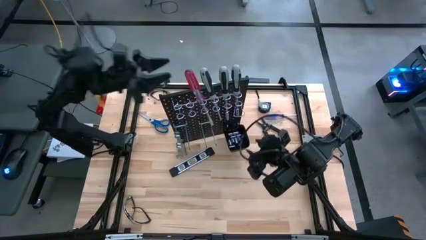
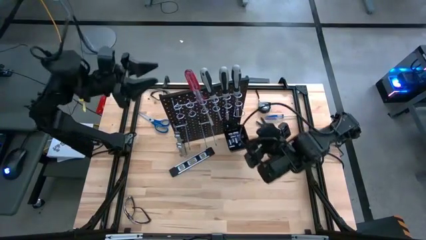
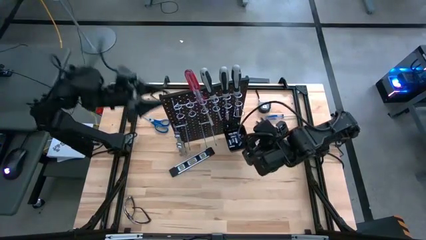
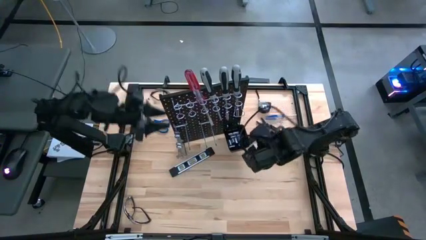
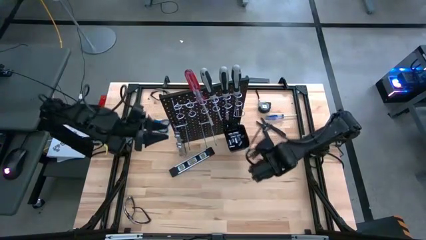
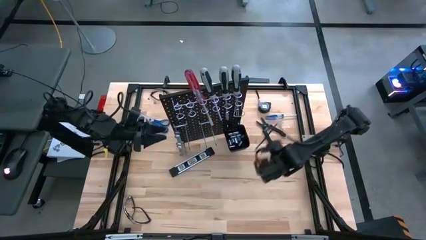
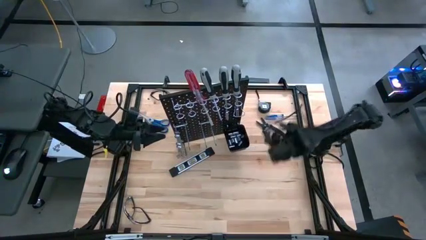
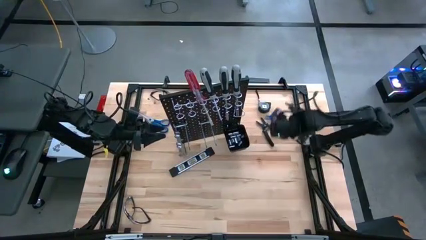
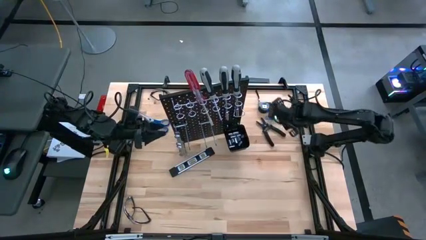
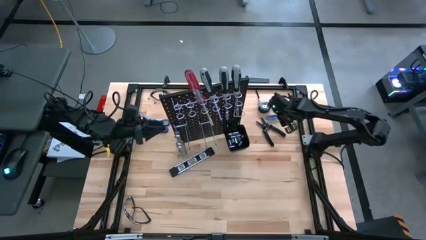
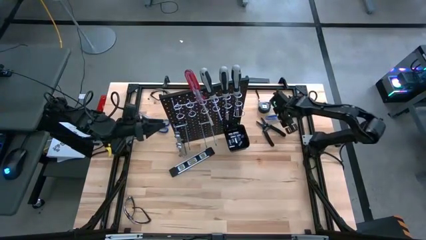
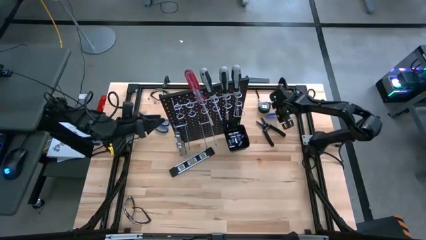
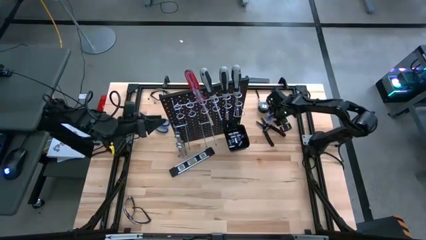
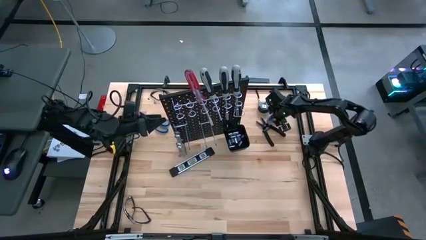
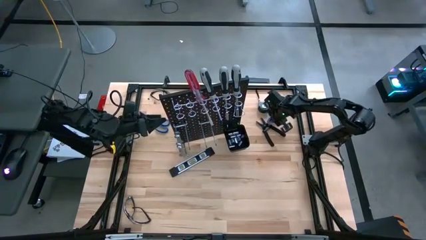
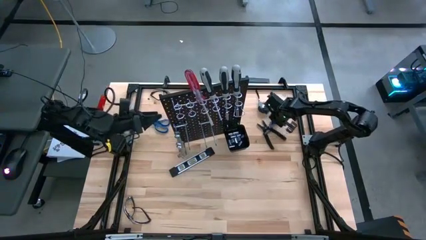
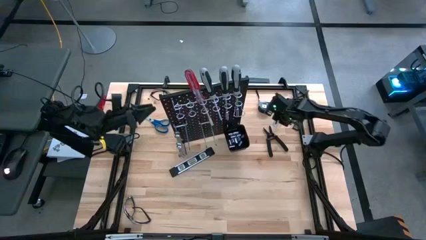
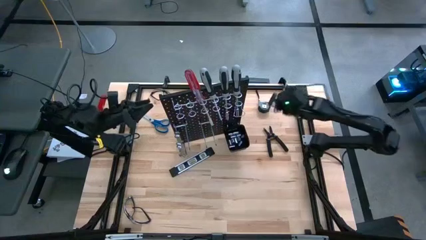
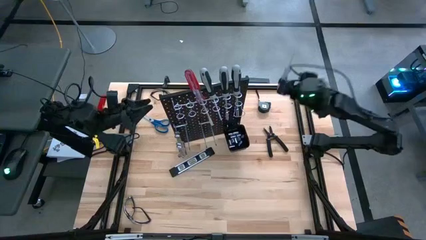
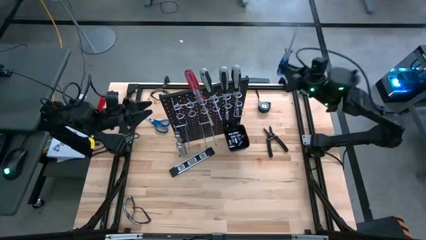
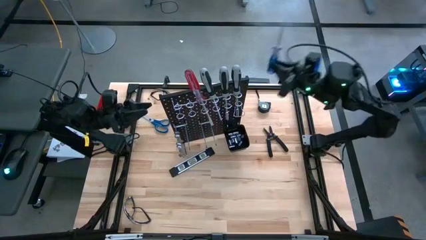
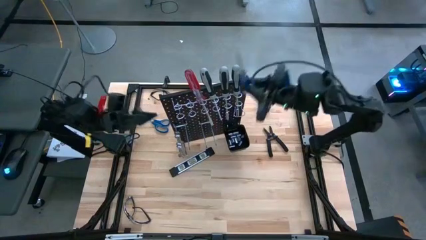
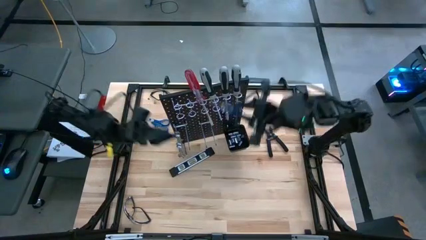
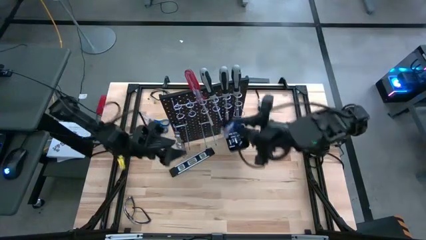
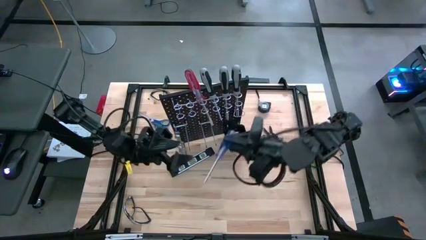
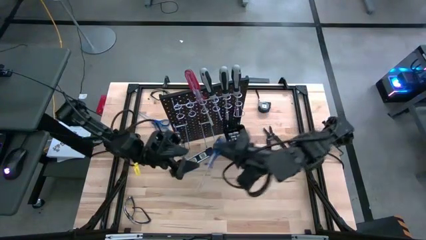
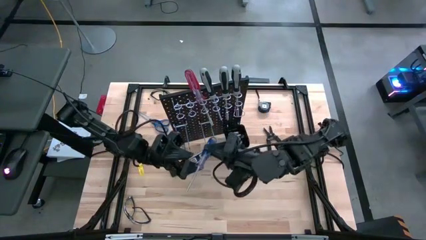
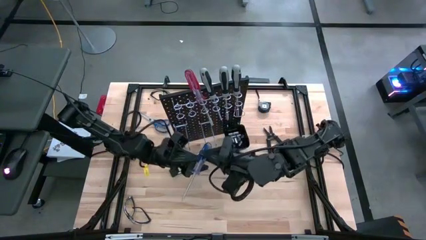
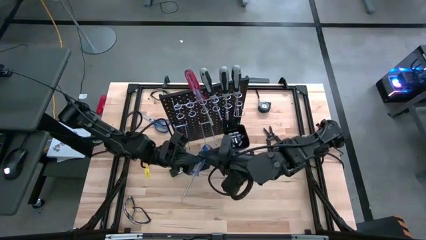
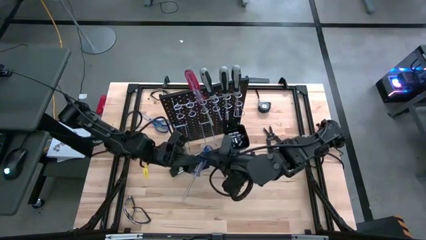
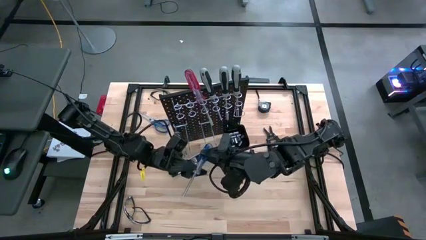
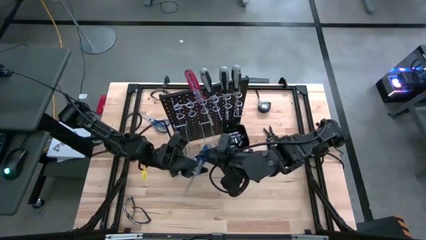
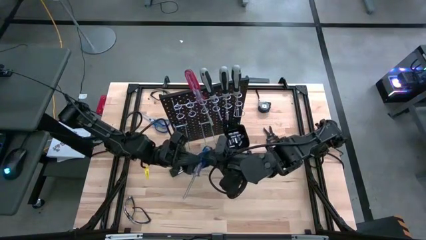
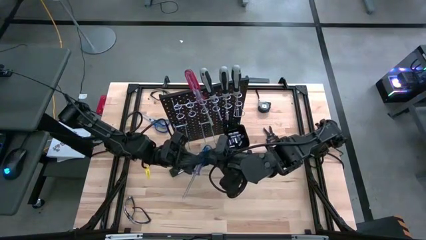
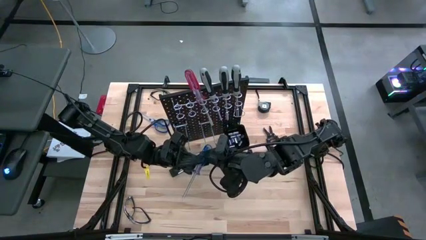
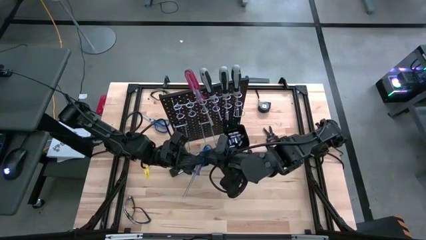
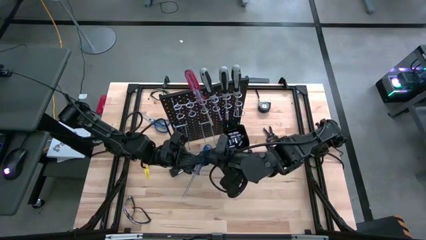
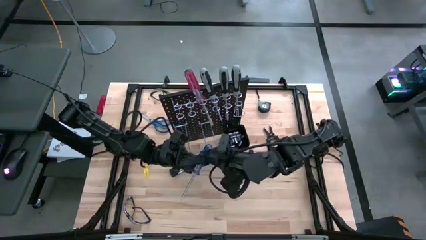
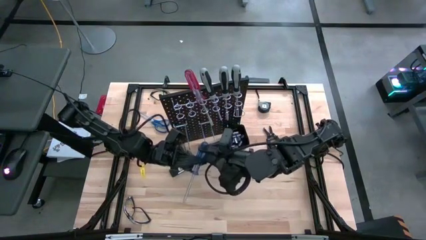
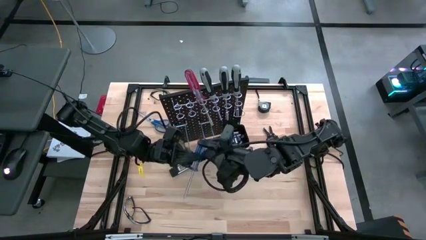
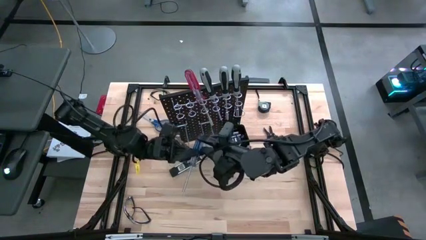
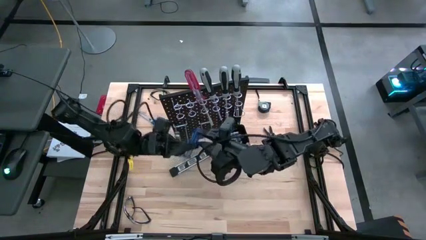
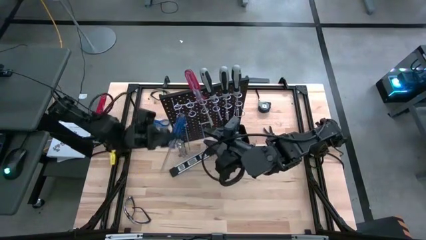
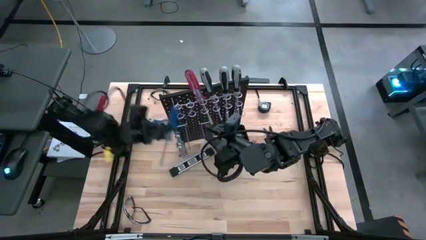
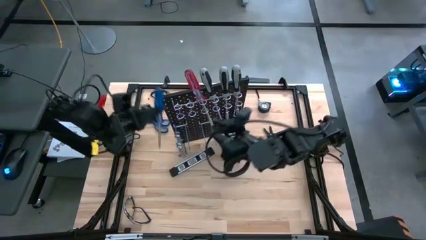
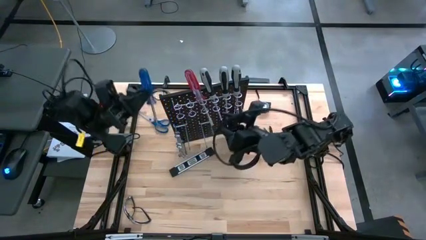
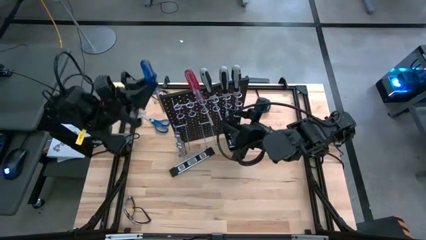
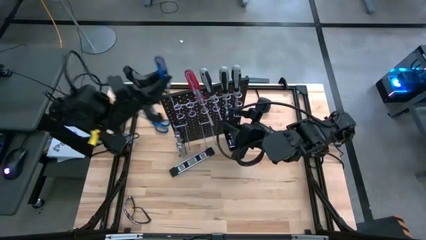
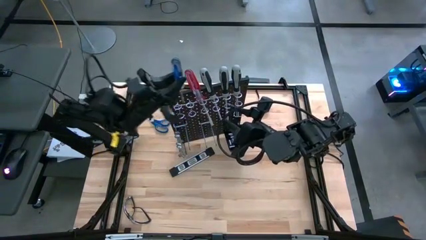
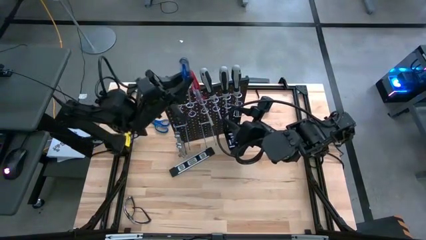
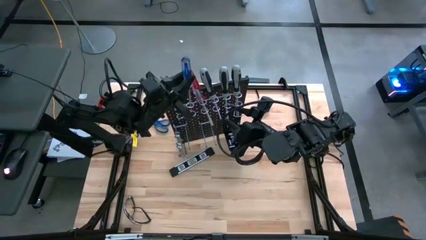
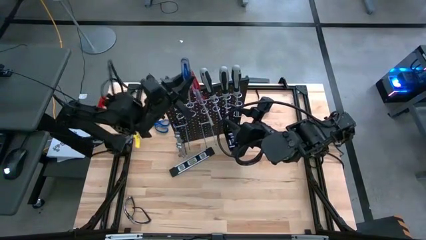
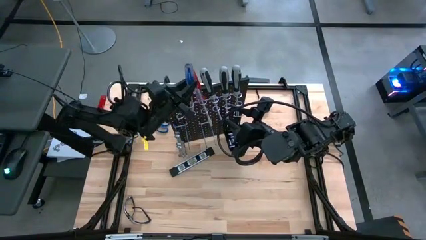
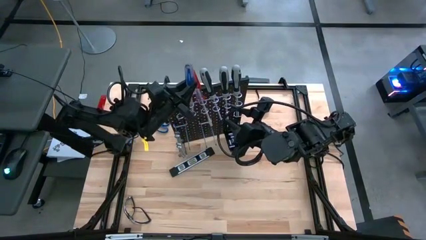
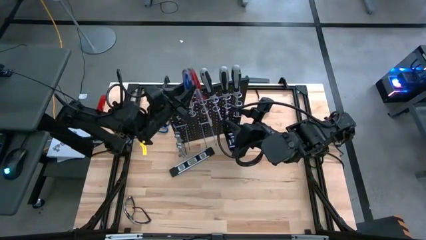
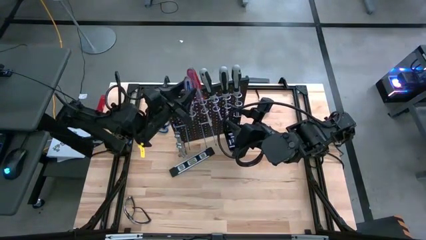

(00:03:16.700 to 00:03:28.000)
Task: Hang tools onto peg board
Hang the blue transparent screwdriver on the pegboard

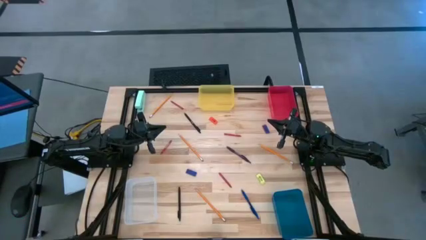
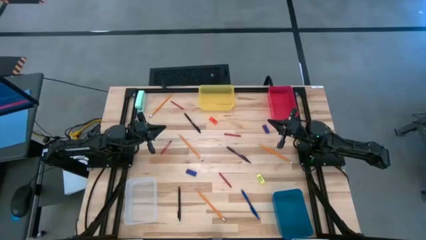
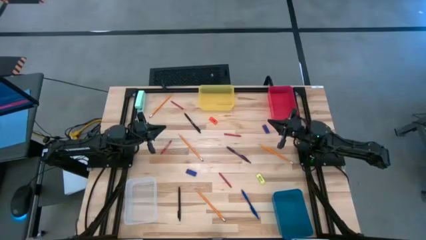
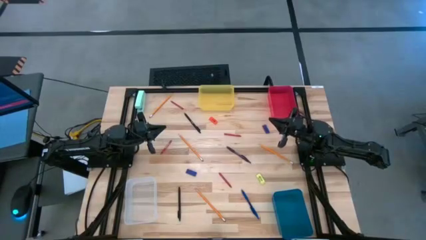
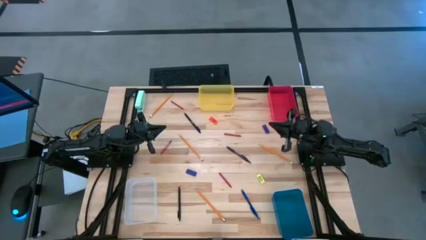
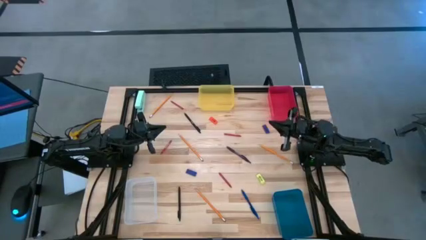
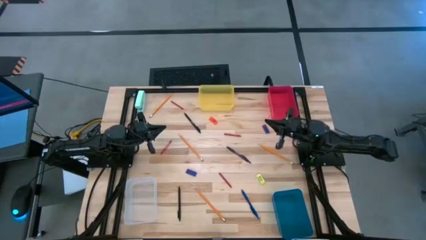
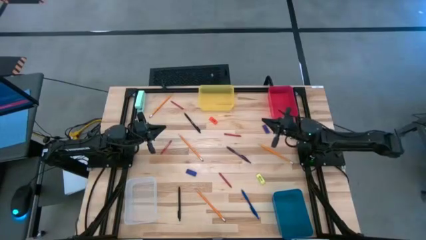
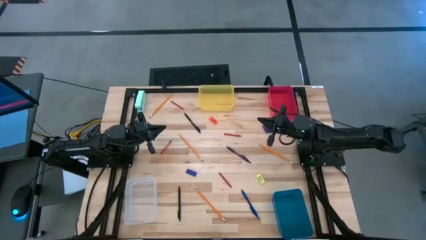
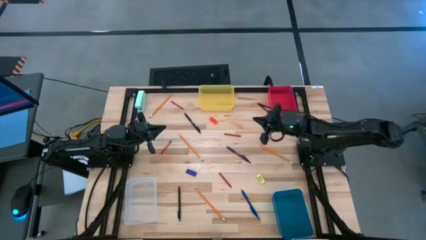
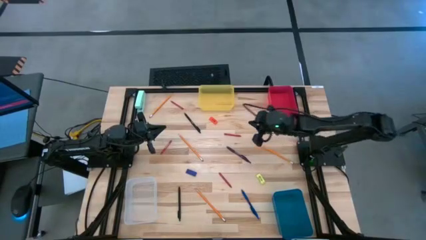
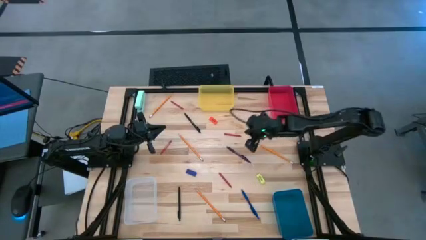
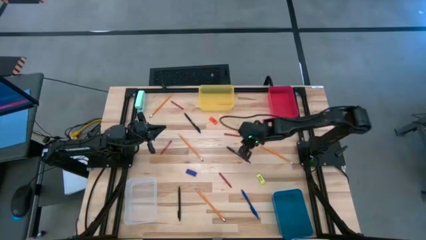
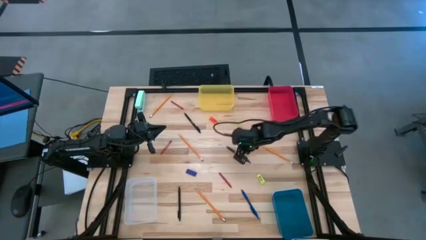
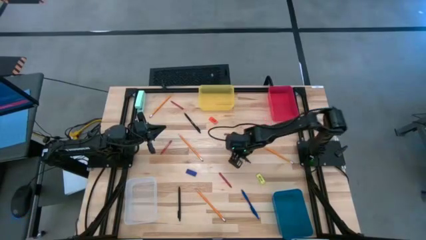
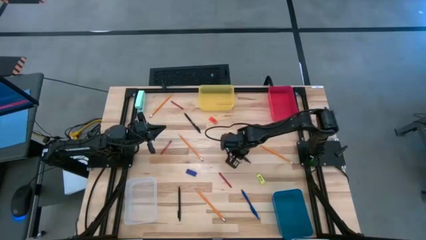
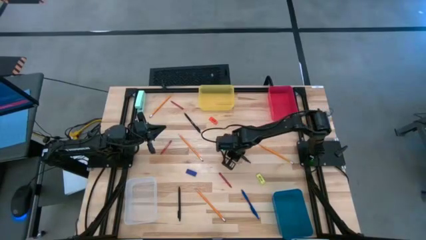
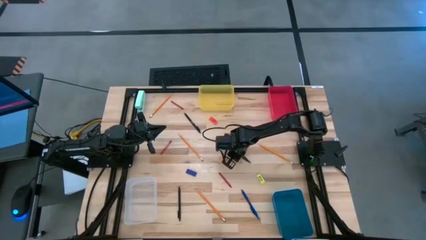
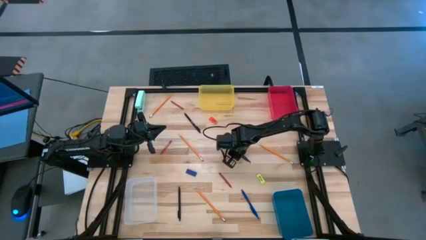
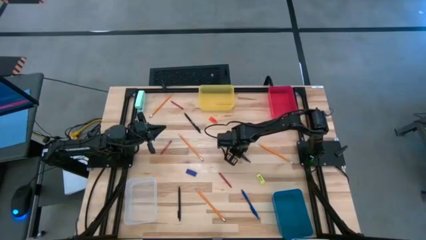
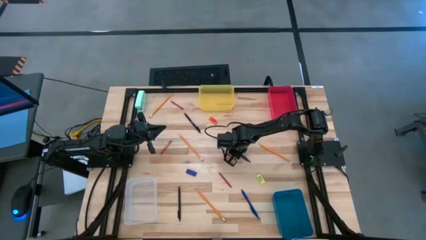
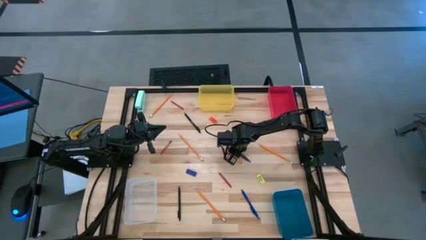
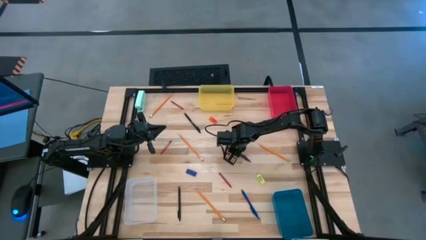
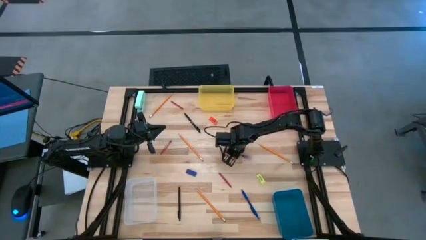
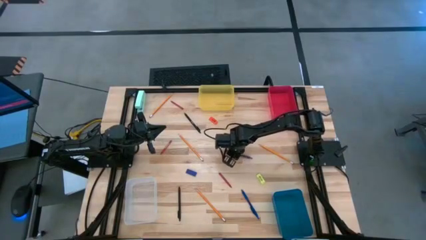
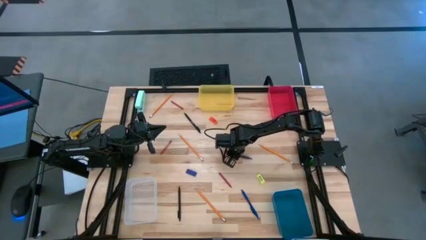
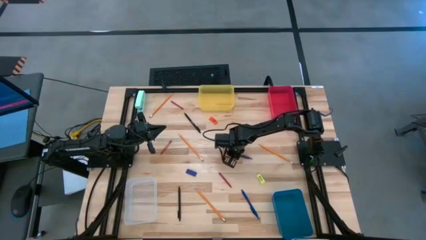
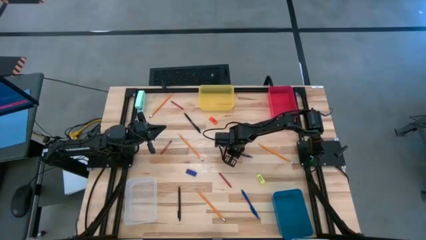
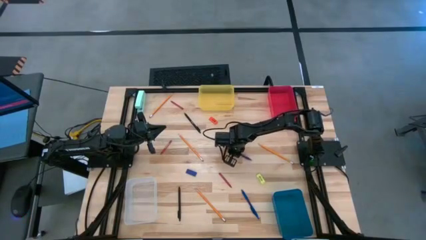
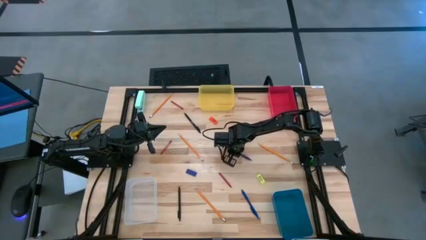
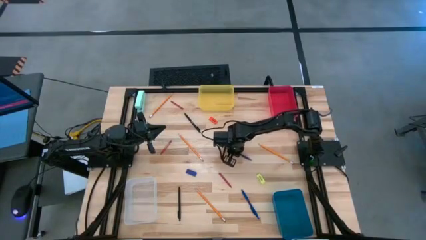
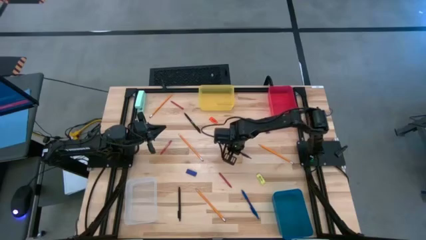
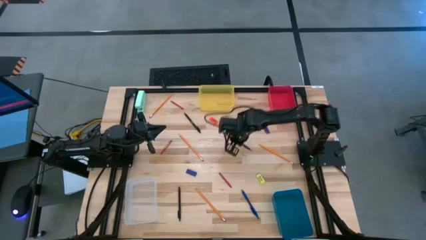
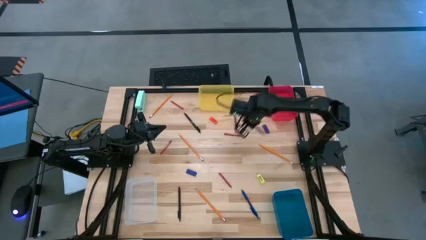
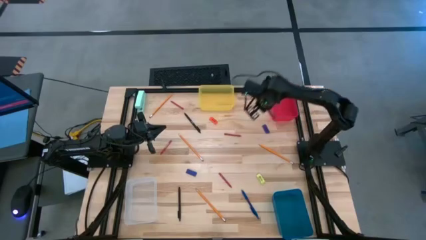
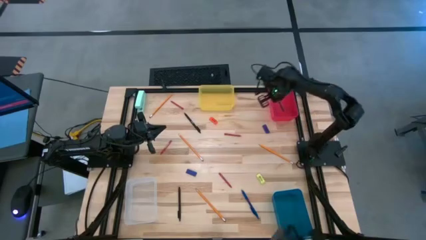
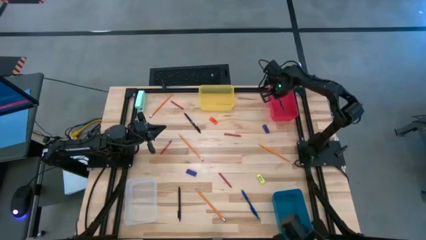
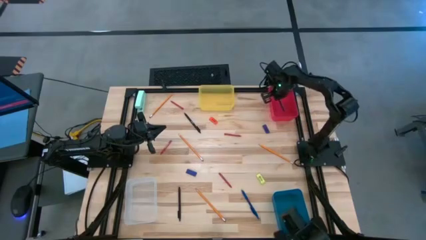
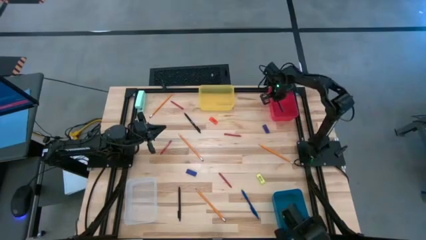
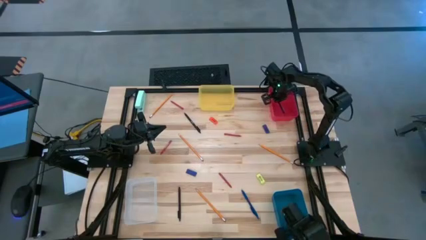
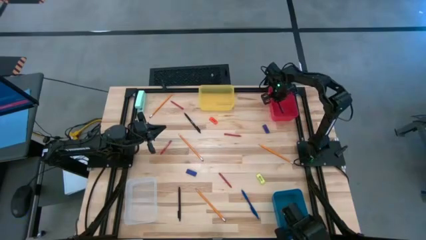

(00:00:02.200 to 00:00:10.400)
Task: Sort crayons/erasers/pens/pencils in bins
Put the purple pen into the red bin
